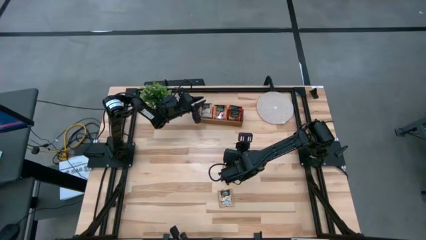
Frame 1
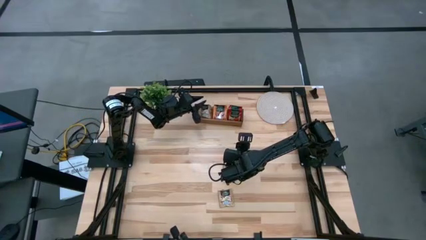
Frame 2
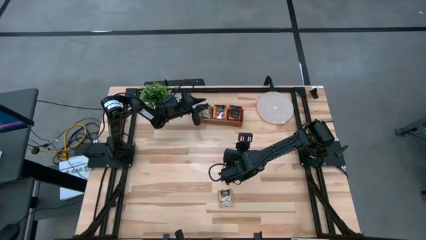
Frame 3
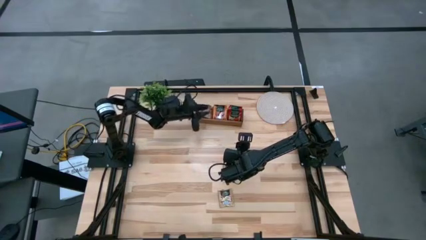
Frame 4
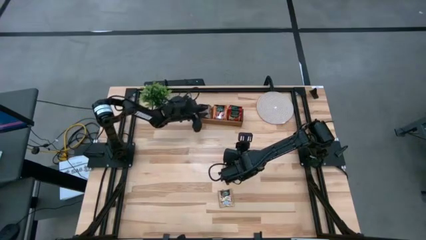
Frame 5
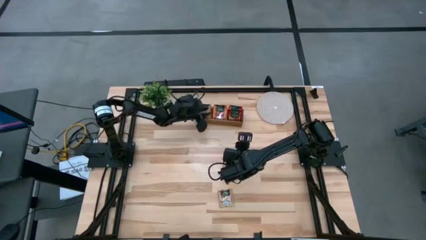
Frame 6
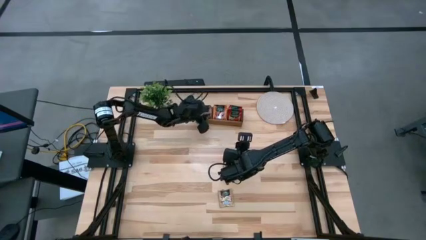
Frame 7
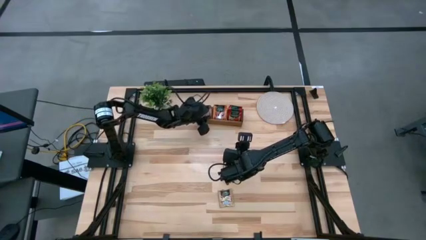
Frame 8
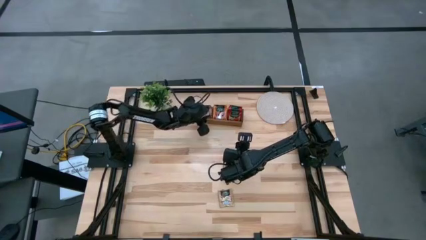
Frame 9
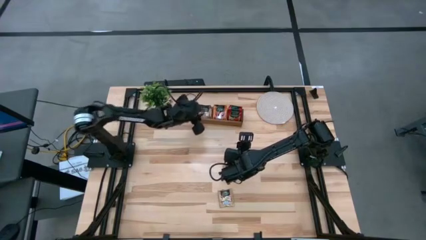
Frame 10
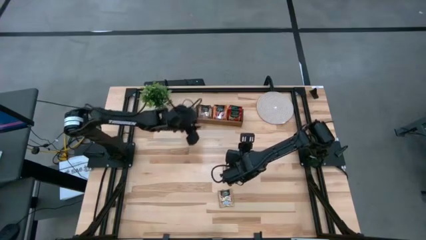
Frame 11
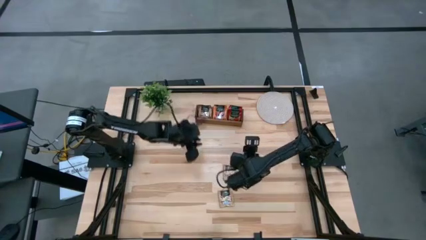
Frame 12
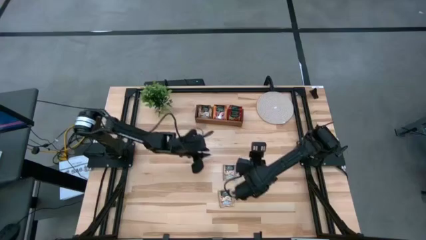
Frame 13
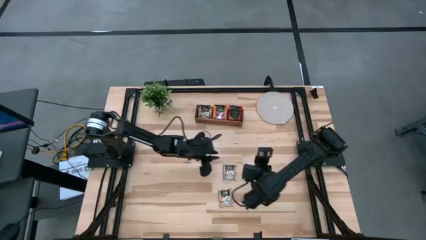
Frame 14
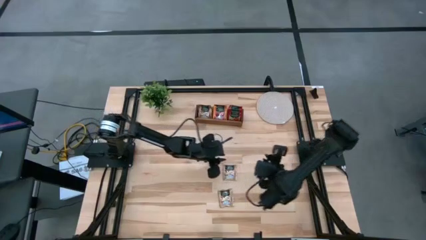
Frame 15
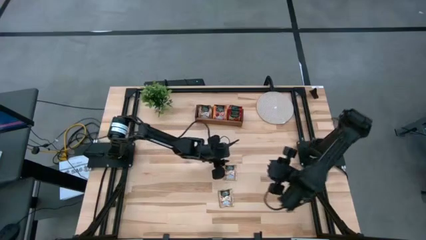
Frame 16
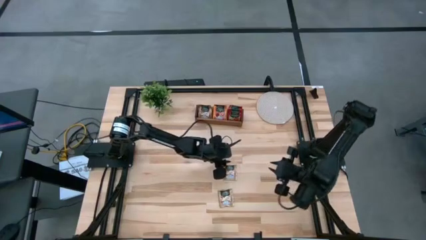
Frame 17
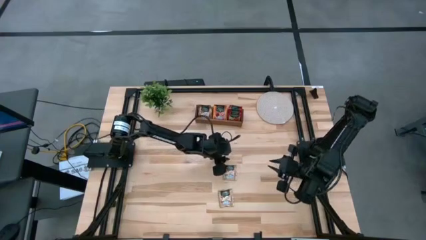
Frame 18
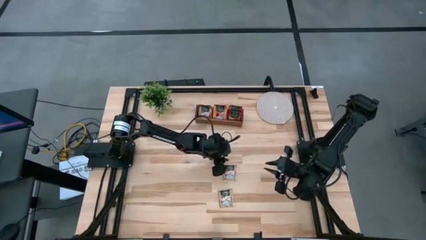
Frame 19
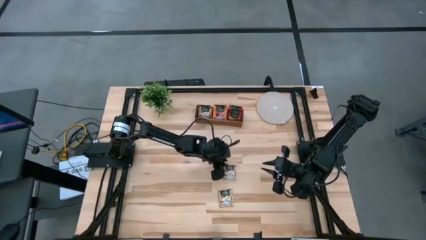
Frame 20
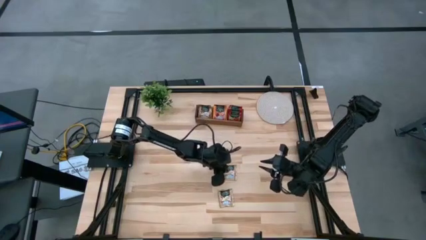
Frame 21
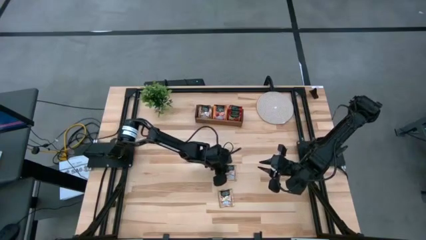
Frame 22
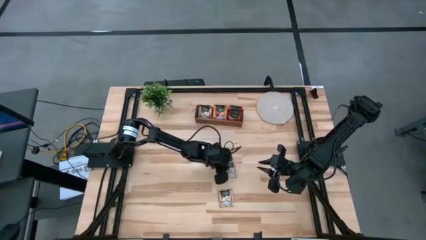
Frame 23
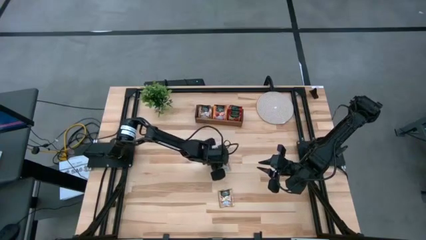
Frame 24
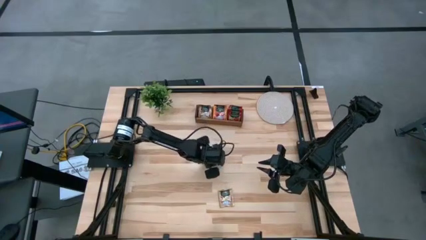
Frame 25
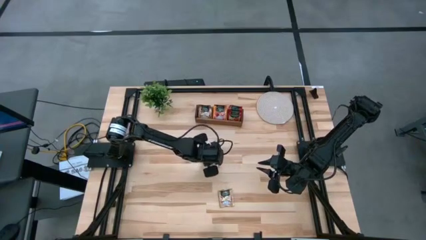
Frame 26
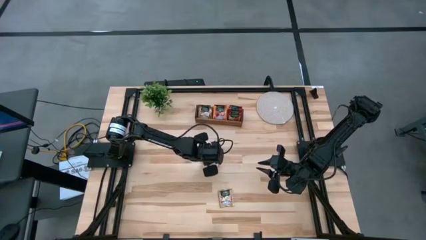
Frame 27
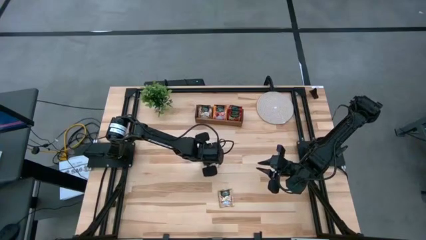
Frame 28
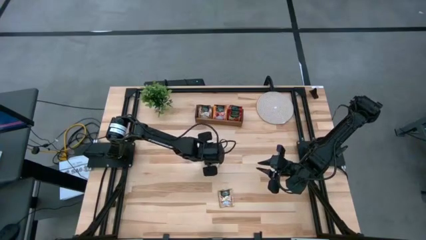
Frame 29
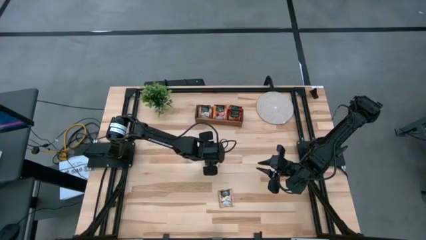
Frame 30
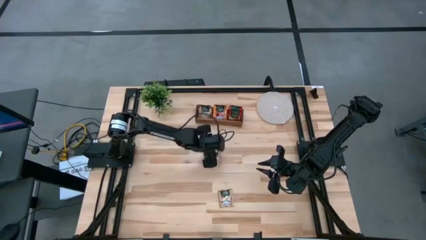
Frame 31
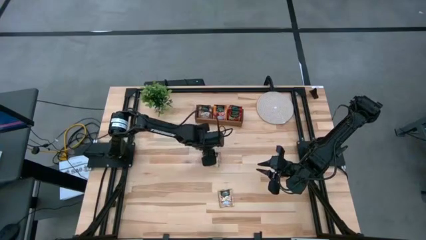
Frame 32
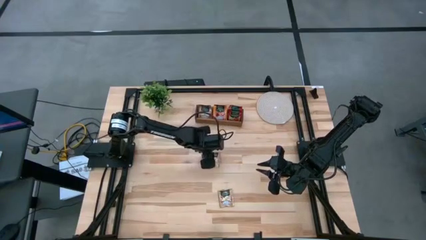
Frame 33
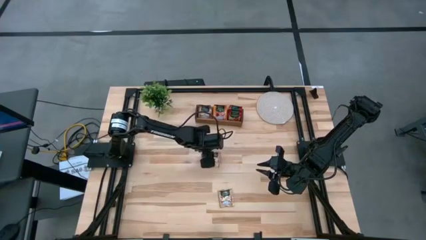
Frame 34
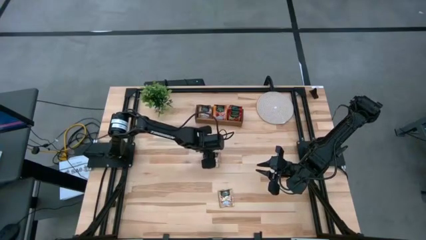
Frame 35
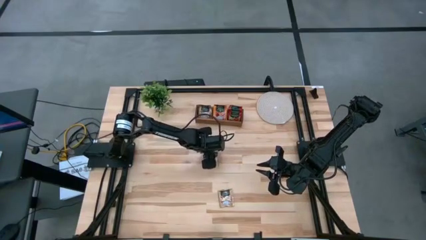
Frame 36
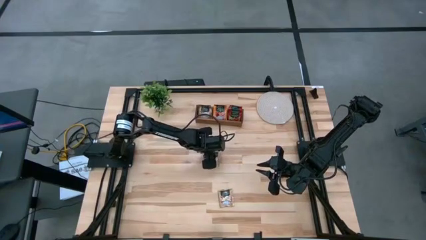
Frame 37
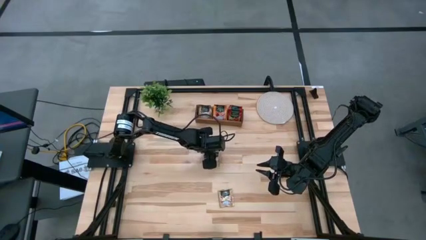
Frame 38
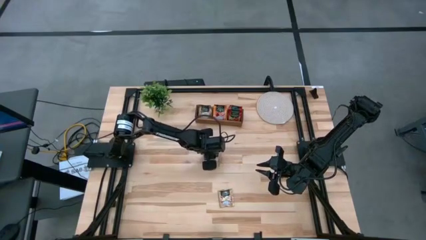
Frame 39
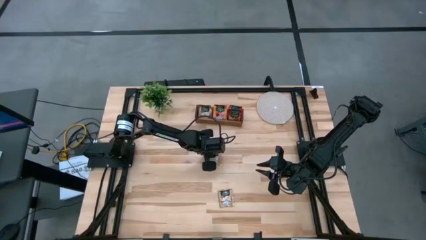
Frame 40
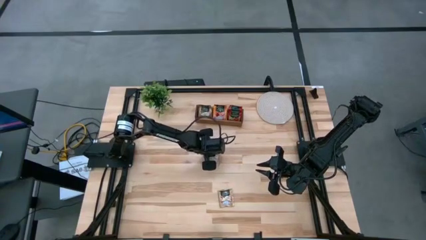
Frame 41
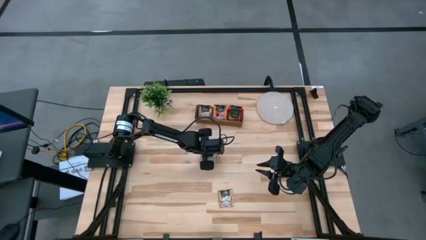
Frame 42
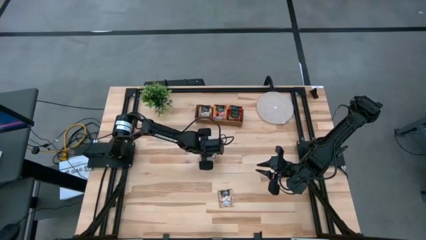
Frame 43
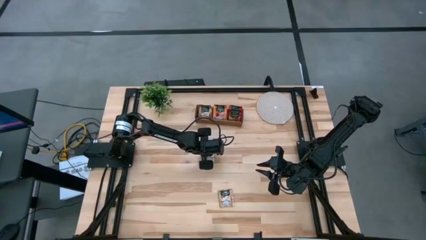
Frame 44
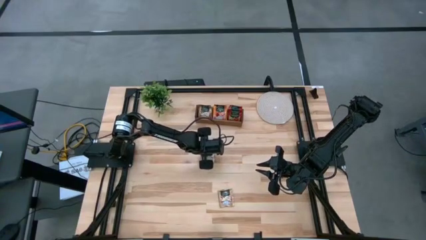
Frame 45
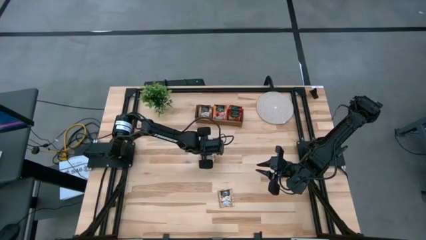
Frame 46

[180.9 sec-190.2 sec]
Task: Pick & Place Tea
Put the brown tea bag into the left section of the wooden organizer

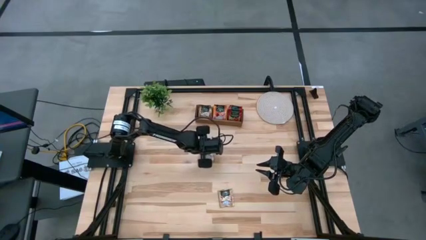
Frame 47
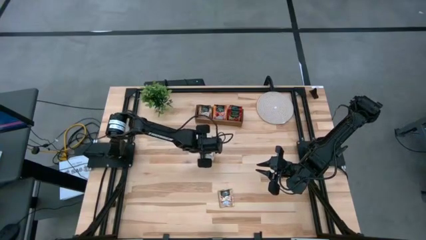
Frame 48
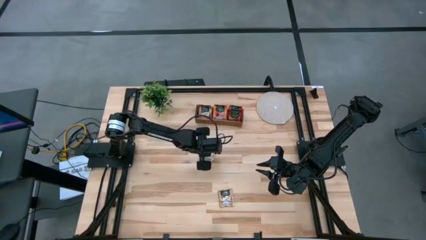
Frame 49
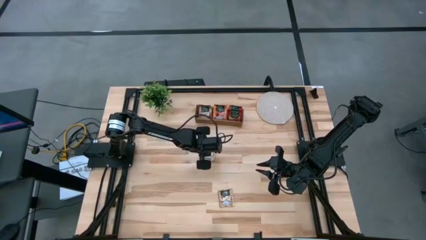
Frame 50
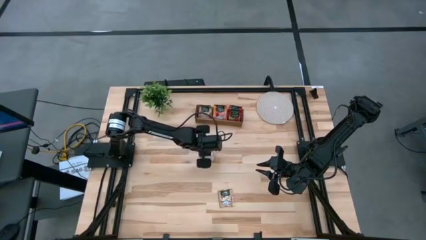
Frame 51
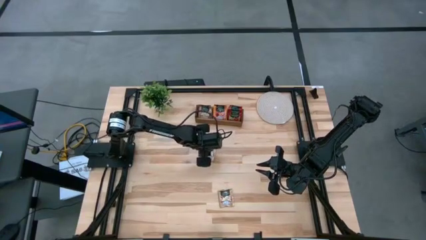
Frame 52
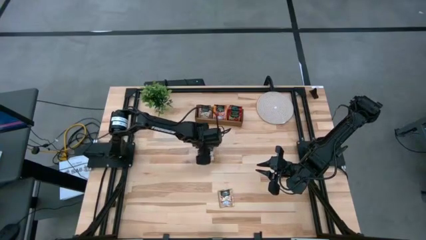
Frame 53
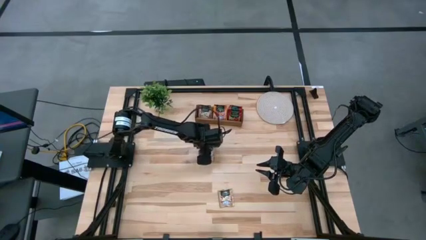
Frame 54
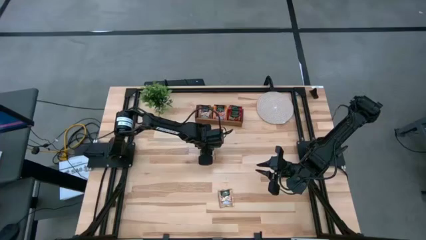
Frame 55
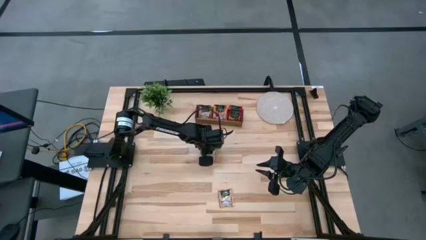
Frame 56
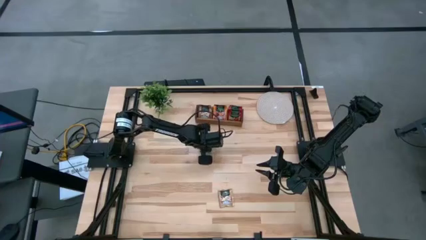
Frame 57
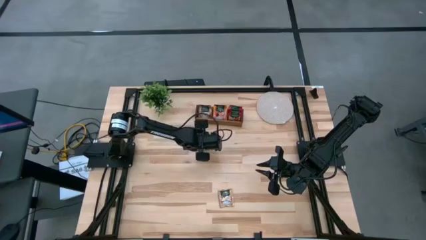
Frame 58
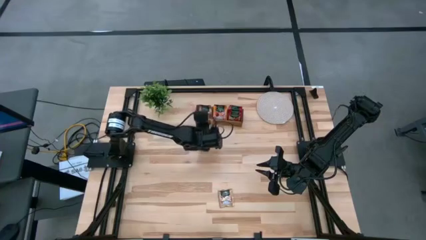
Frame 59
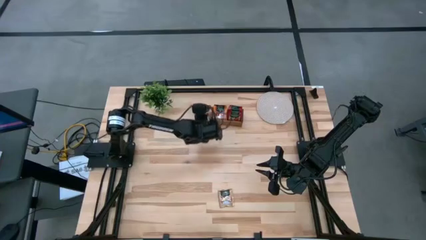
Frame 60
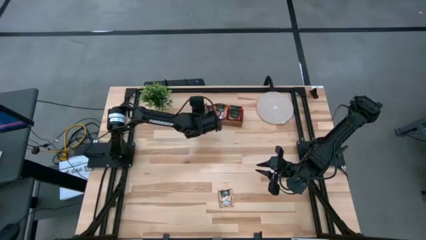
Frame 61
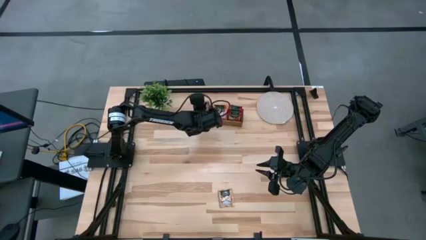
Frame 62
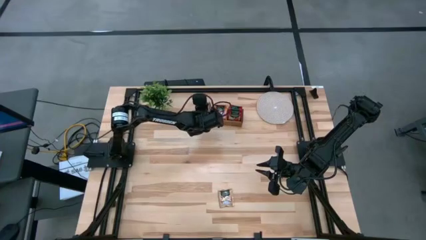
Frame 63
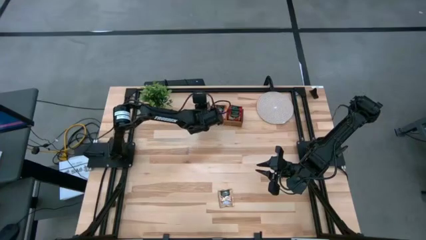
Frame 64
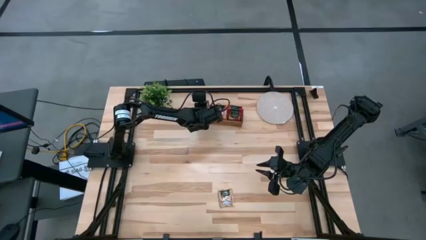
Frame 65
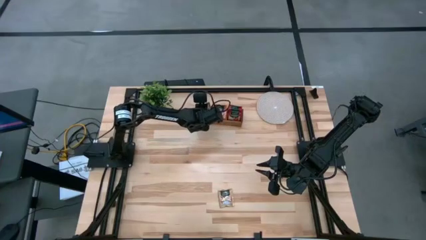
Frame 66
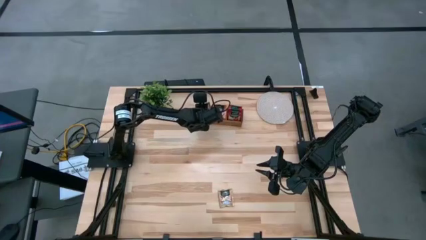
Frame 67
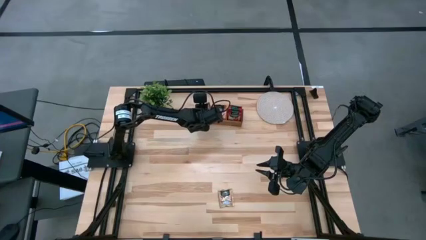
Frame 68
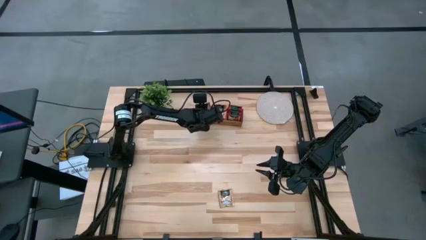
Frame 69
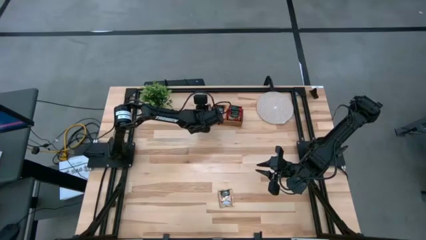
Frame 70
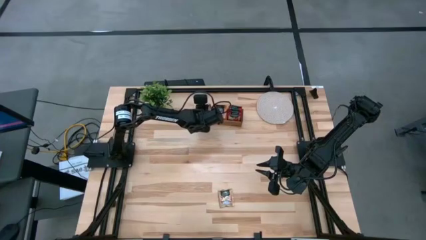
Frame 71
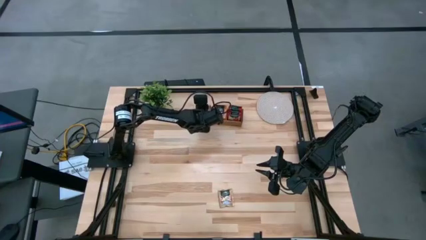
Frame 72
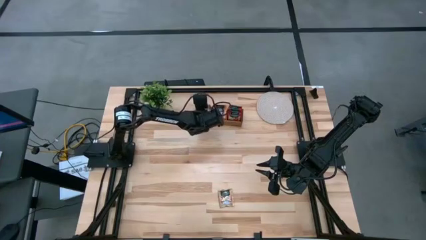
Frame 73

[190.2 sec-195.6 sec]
Put the brown tea bag into the left section of the wooden organizer
